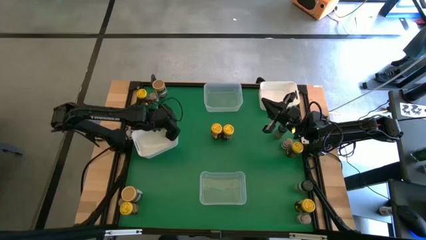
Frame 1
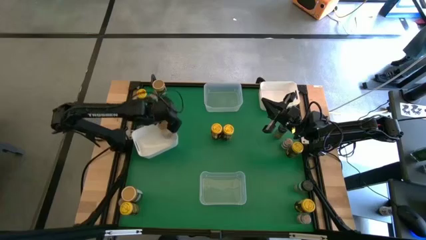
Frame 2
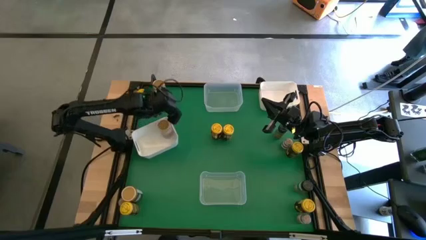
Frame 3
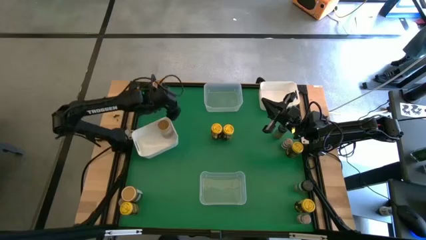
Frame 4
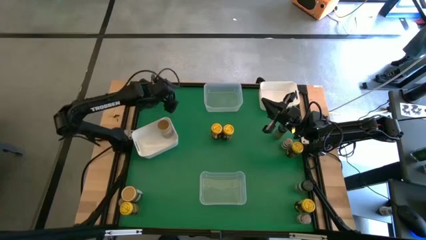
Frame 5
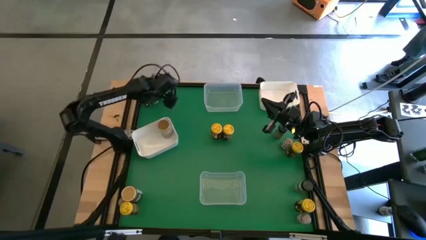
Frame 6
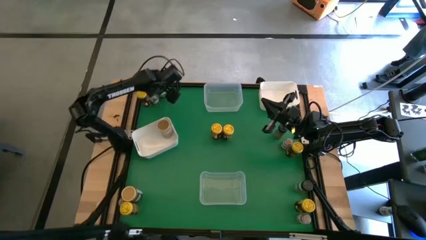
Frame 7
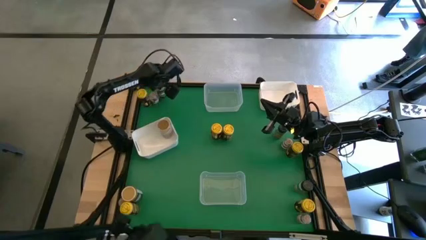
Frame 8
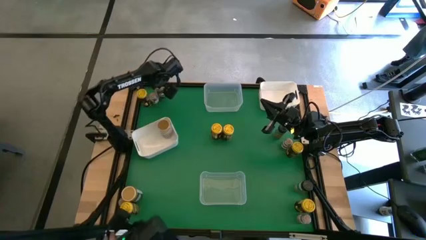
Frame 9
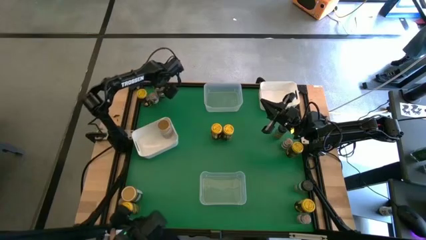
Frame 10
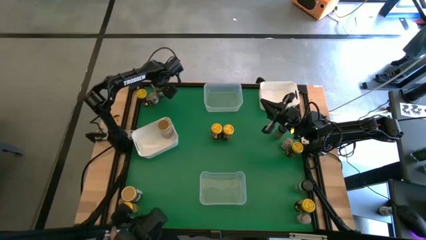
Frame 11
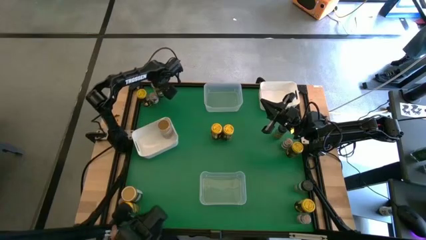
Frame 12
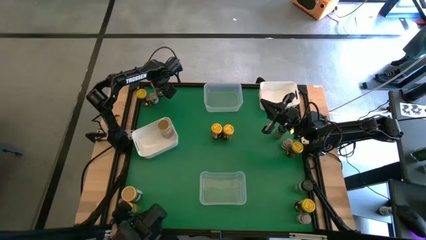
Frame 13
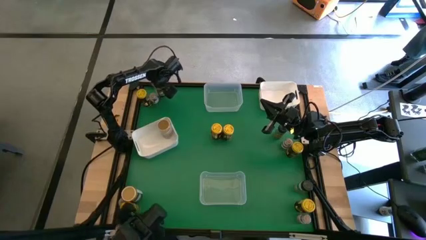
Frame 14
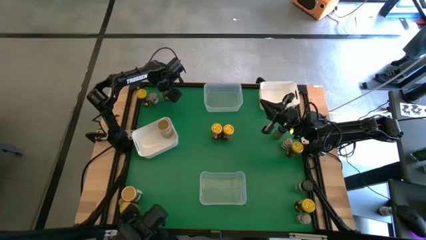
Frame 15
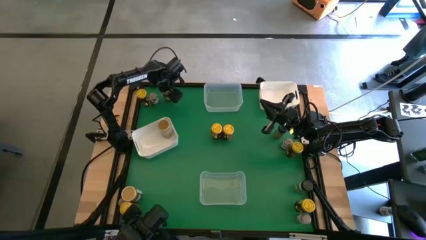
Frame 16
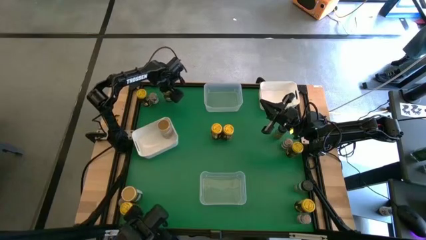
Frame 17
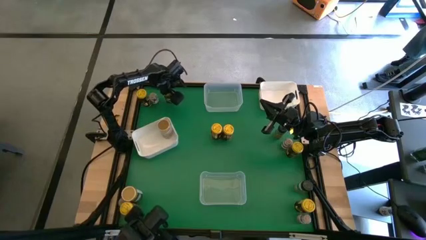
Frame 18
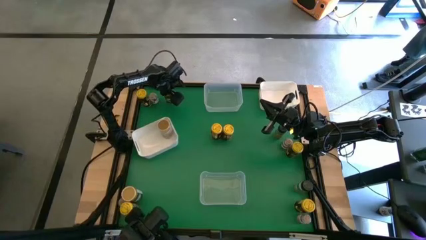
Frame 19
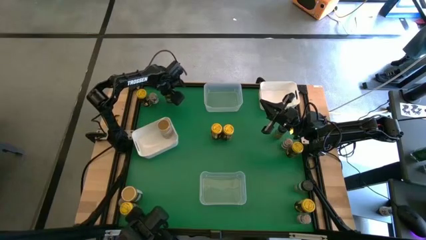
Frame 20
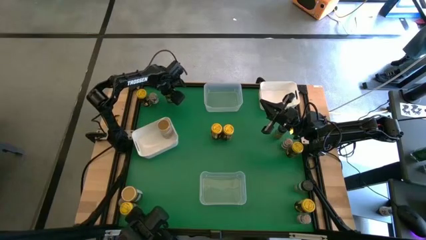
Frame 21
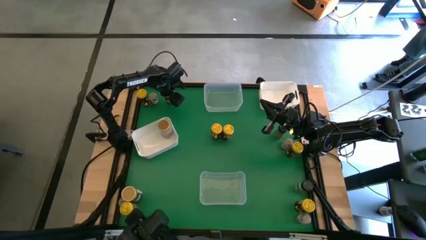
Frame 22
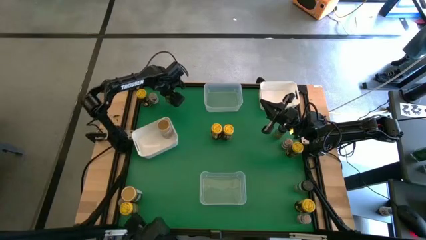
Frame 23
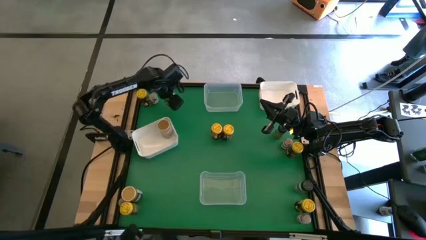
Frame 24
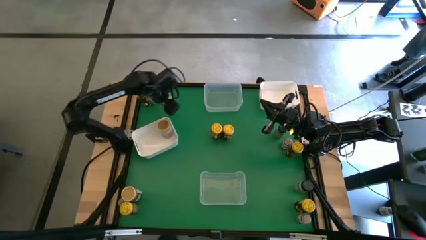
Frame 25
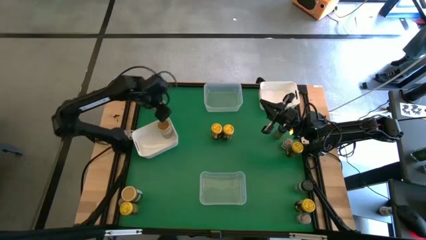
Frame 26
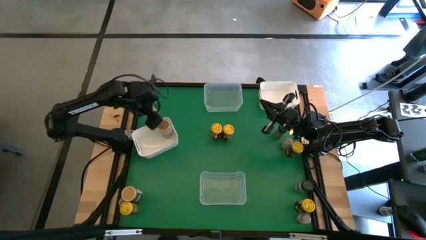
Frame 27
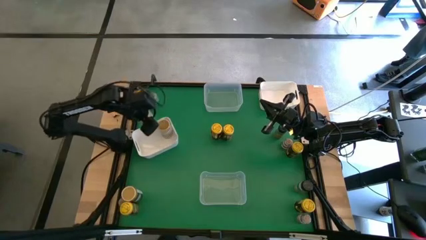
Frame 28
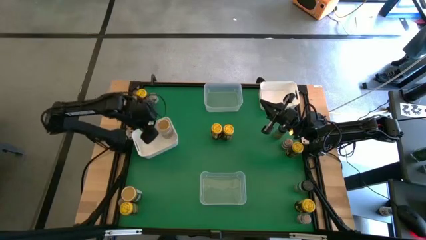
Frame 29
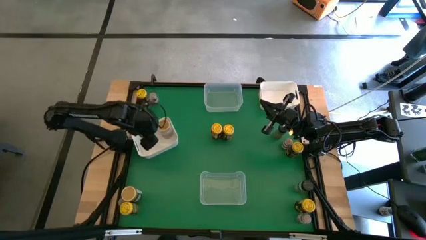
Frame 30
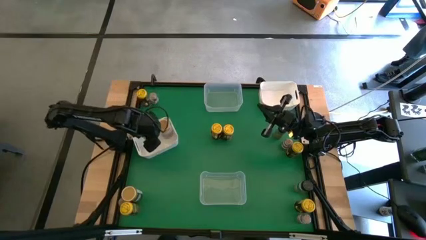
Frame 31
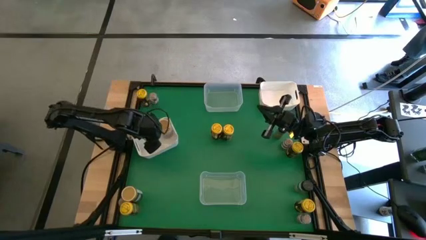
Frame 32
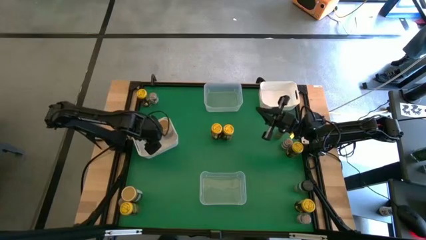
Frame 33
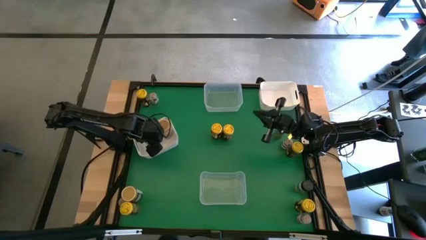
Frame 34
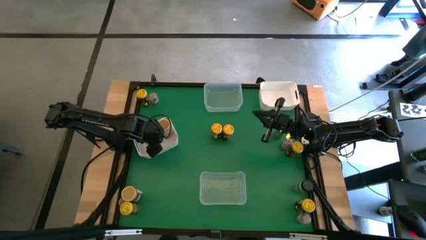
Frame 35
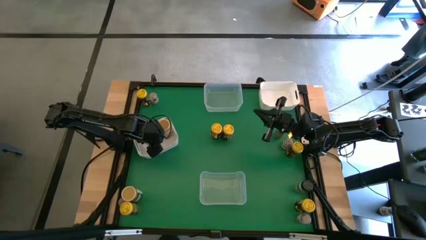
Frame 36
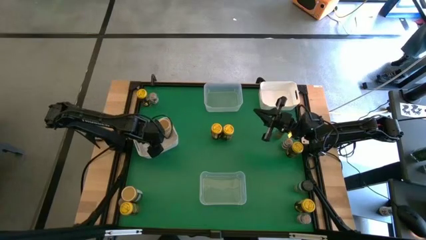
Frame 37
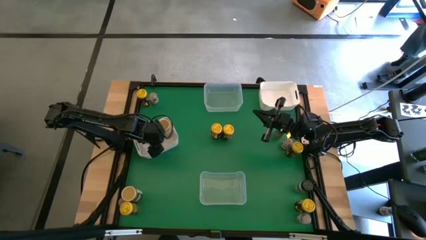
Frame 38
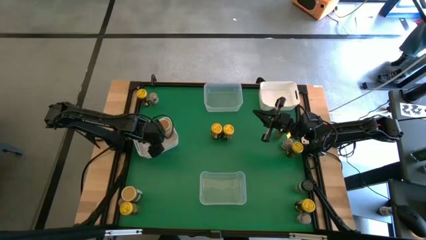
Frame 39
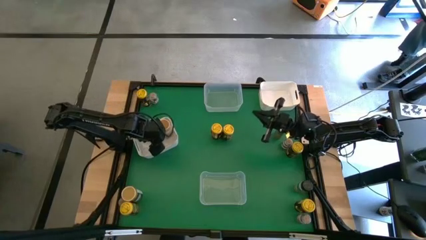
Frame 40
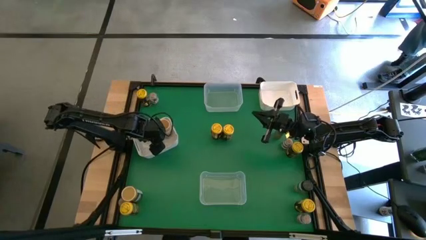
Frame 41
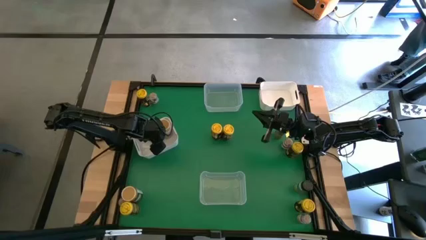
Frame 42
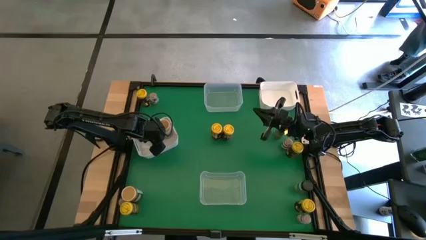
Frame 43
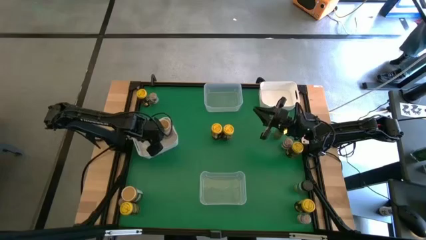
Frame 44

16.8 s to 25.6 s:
Task: Sort spices by type
Put the gold spice bottle into the left white bin

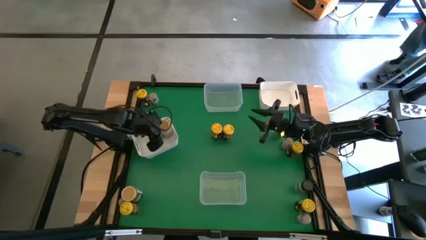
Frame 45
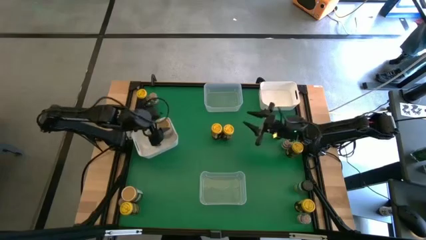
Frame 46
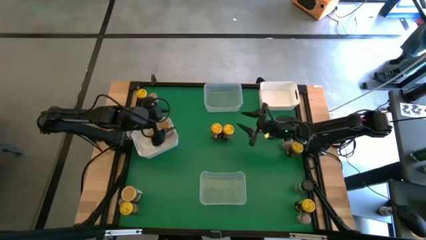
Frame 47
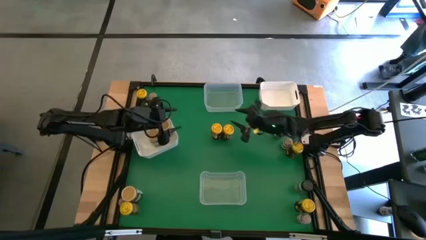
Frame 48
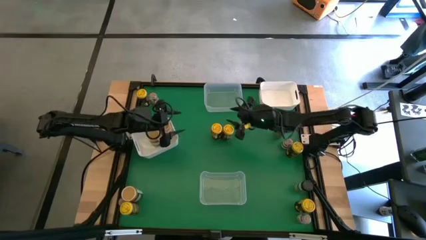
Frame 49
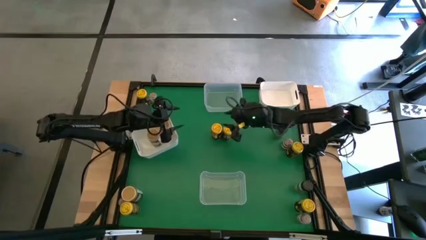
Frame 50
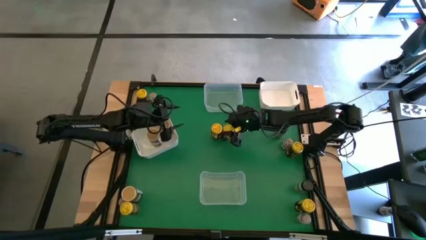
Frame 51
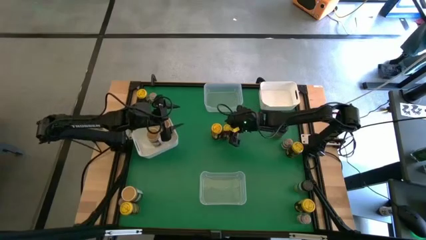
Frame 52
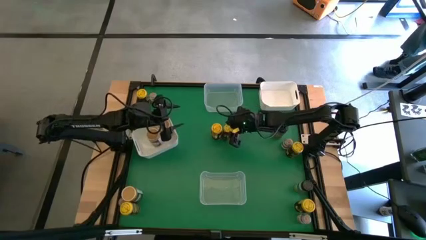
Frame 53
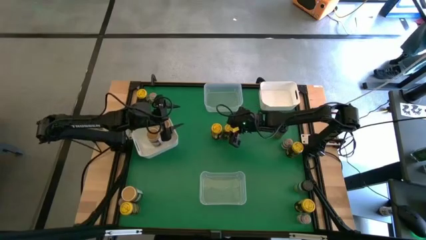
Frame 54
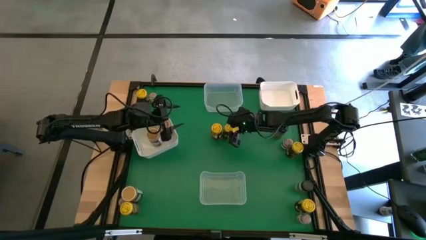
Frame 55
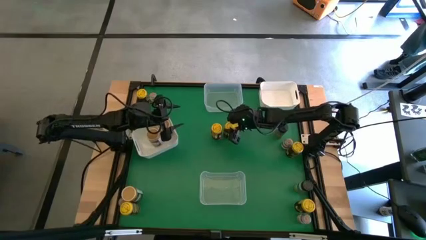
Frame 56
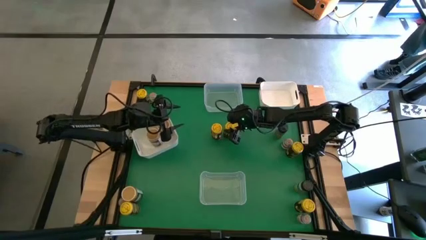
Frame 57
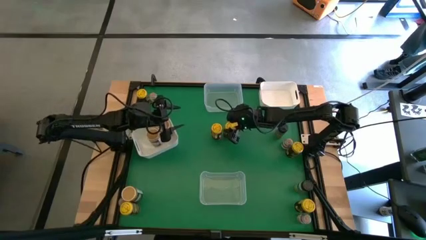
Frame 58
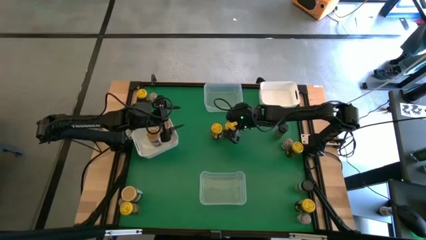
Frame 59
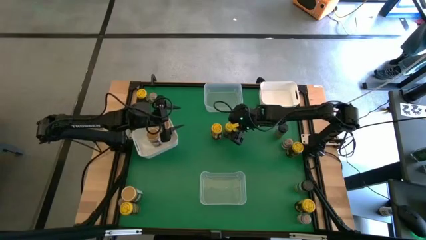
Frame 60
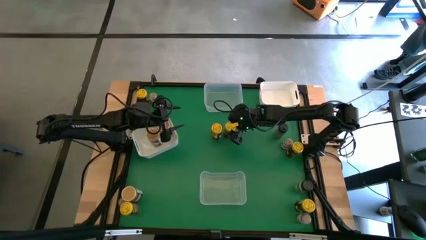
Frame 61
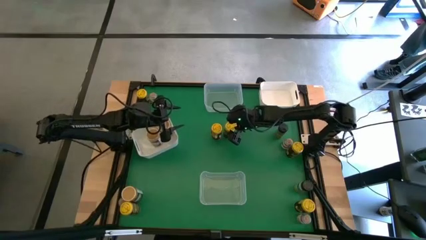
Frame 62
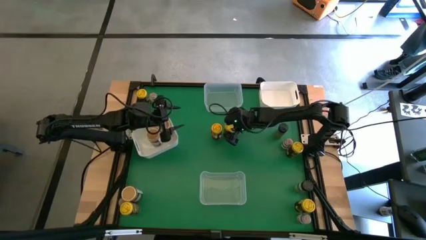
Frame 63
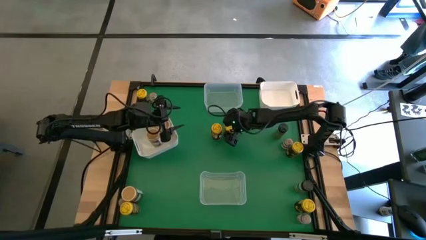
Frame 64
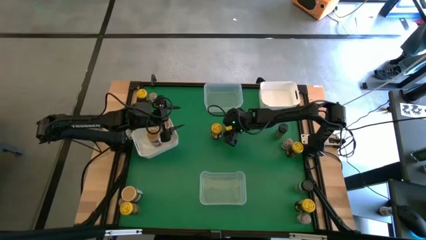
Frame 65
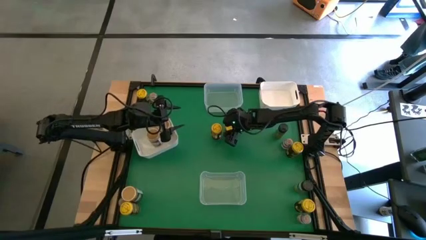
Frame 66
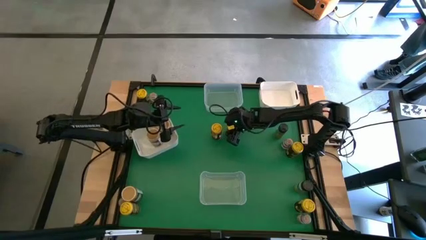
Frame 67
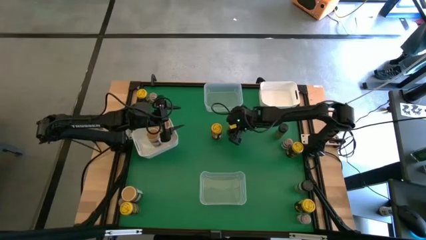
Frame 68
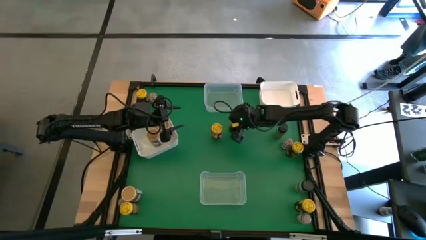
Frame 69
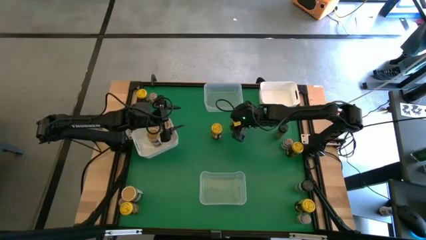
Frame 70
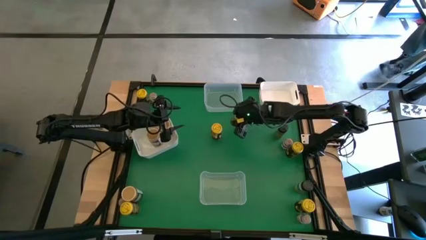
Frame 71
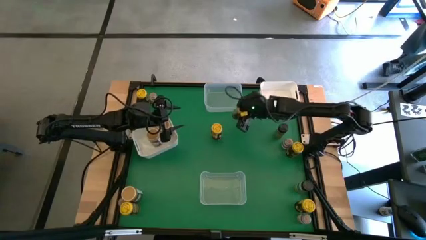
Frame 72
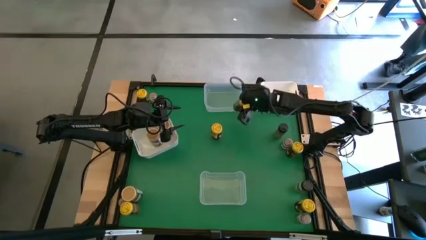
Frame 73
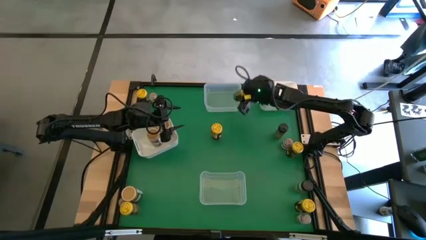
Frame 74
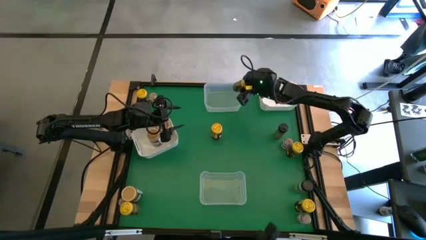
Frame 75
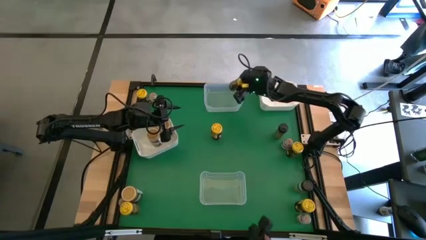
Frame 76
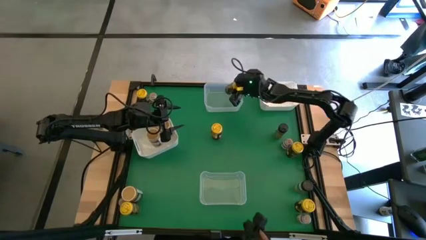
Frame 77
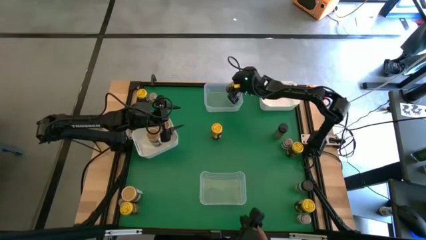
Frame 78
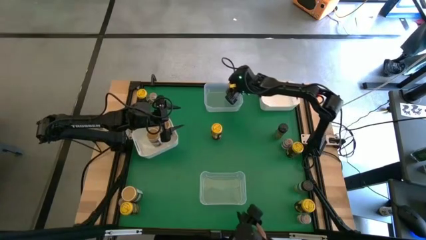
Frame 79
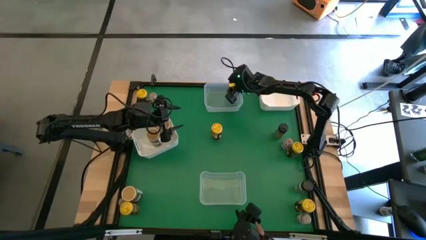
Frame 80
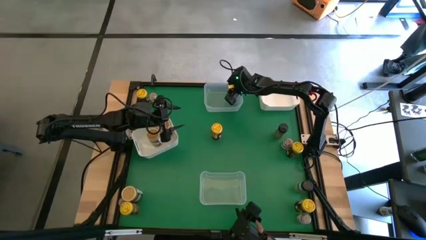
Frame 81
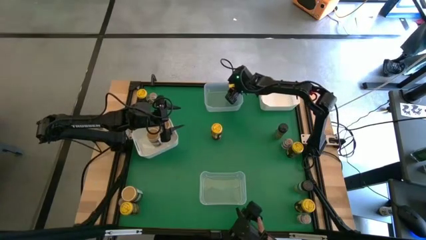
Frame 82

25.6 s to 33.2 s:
Put the yellow spice bottle into the top transparent bin
